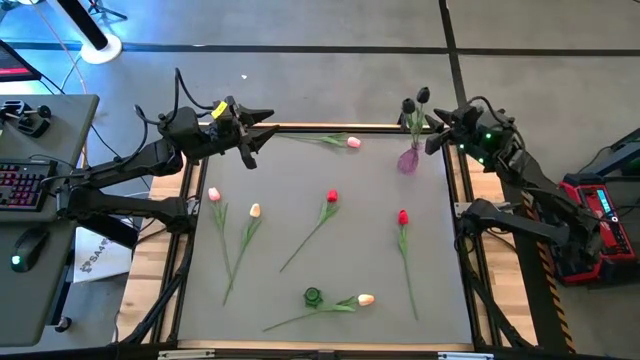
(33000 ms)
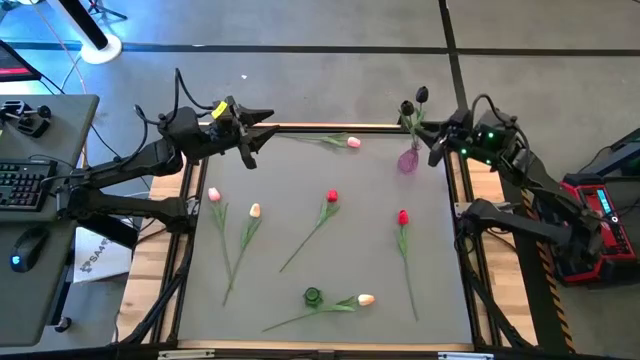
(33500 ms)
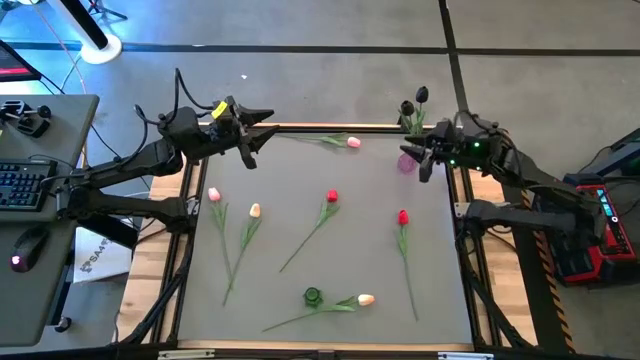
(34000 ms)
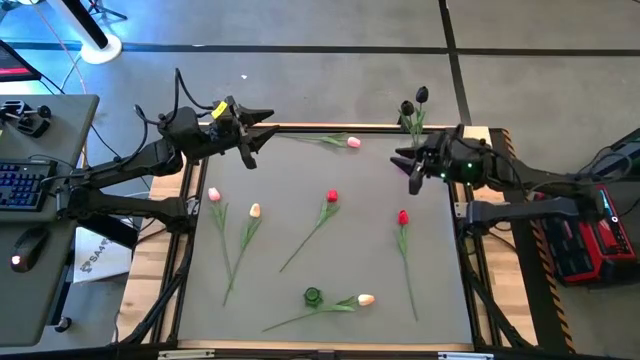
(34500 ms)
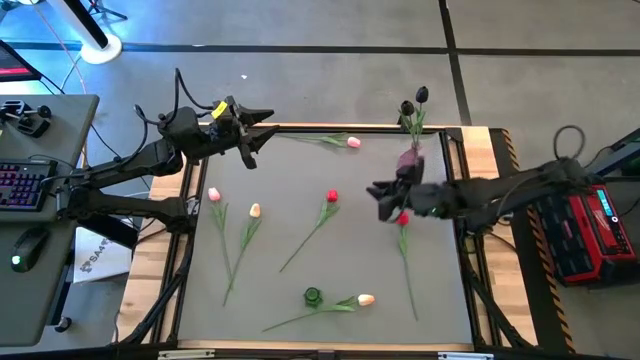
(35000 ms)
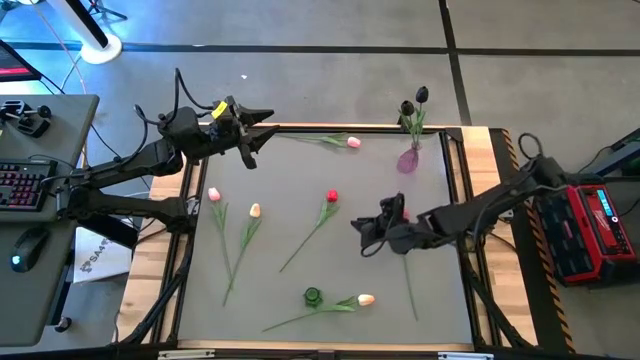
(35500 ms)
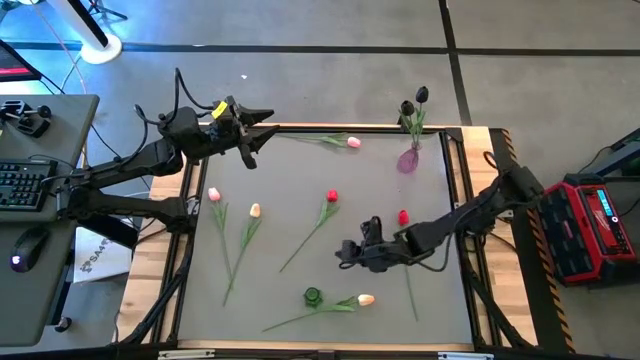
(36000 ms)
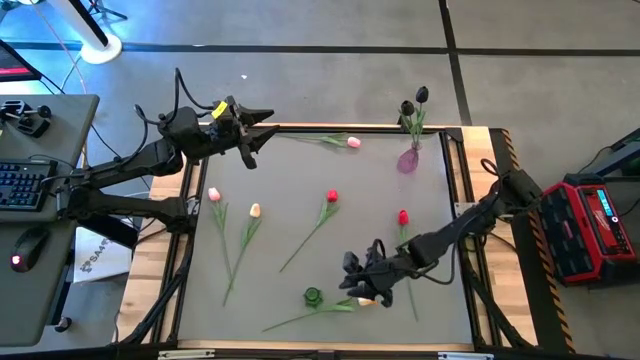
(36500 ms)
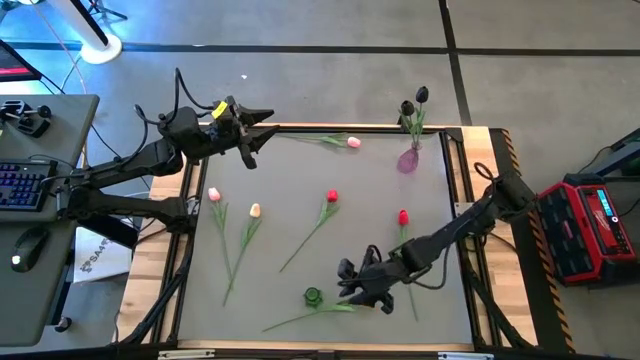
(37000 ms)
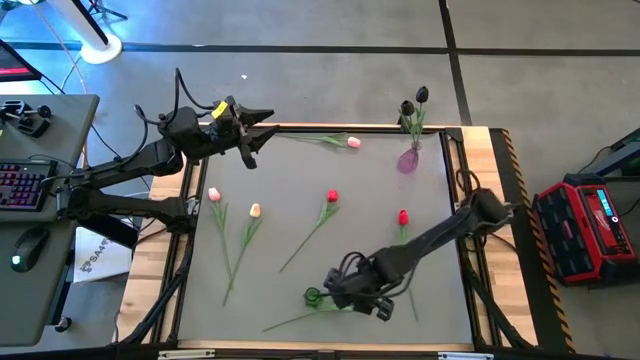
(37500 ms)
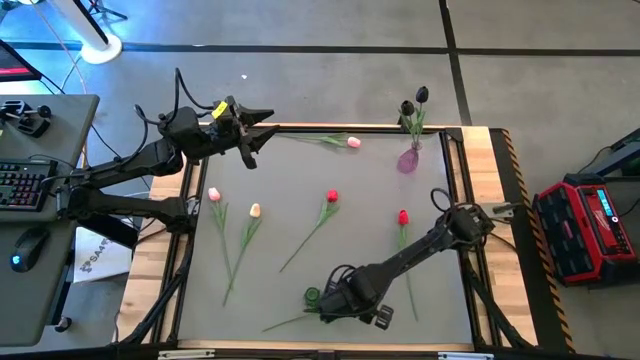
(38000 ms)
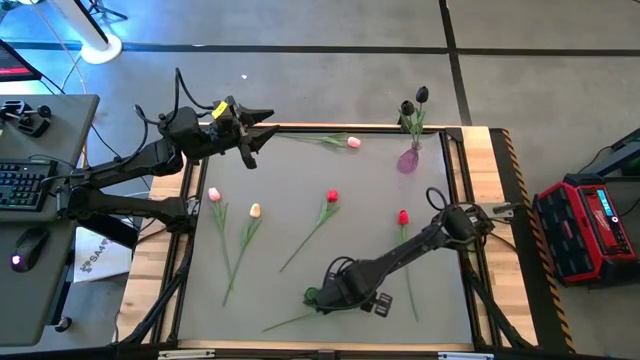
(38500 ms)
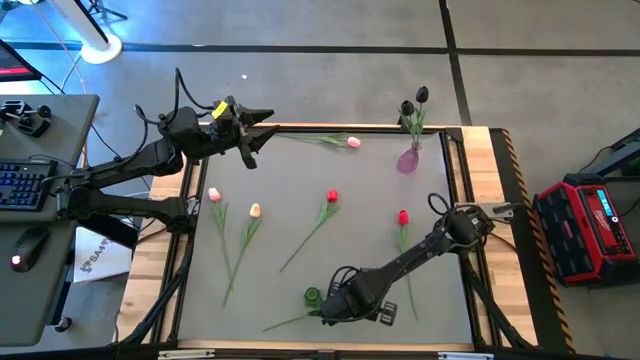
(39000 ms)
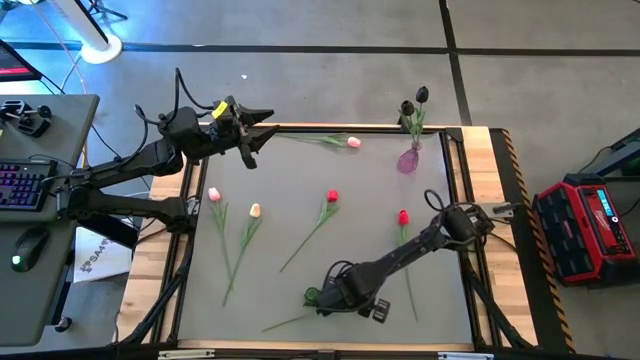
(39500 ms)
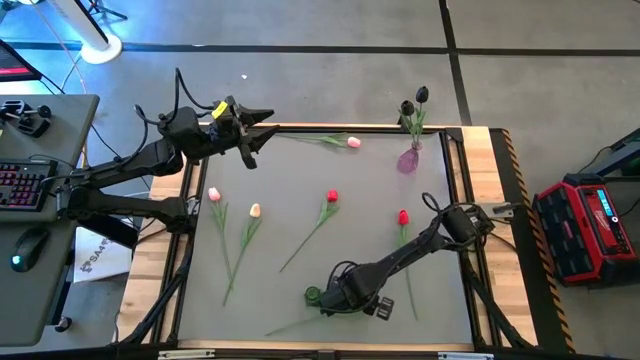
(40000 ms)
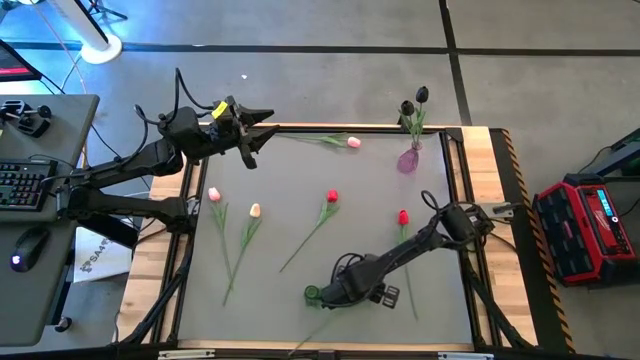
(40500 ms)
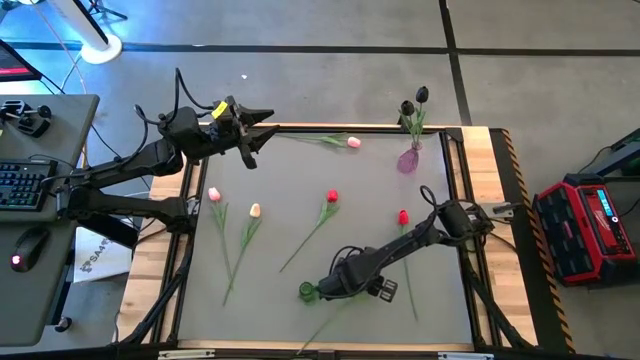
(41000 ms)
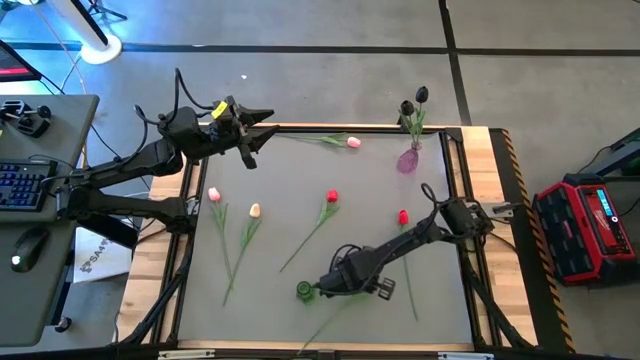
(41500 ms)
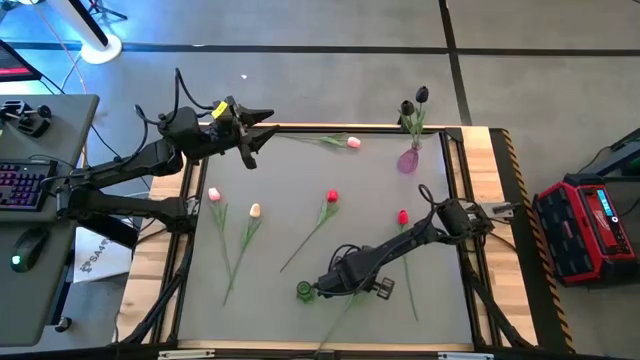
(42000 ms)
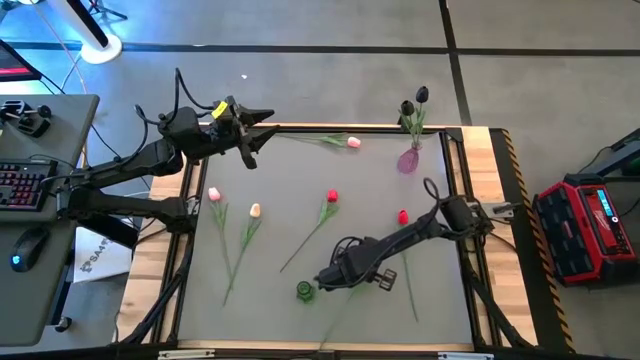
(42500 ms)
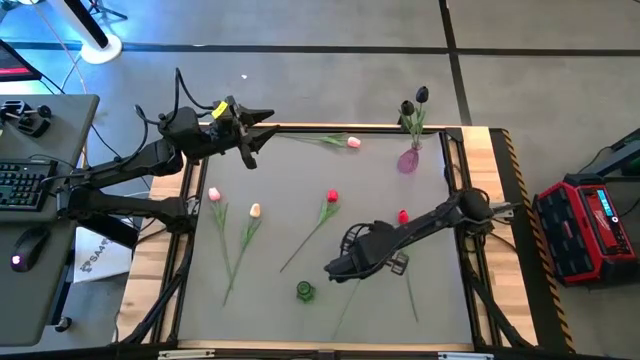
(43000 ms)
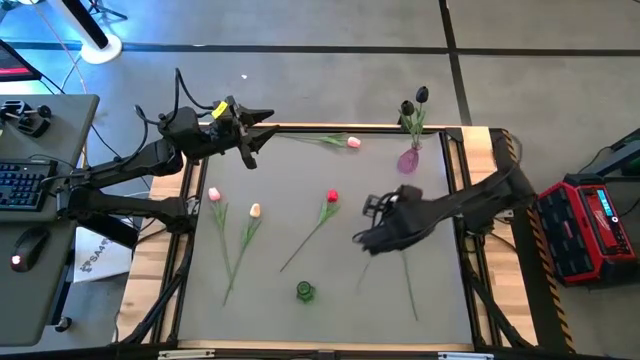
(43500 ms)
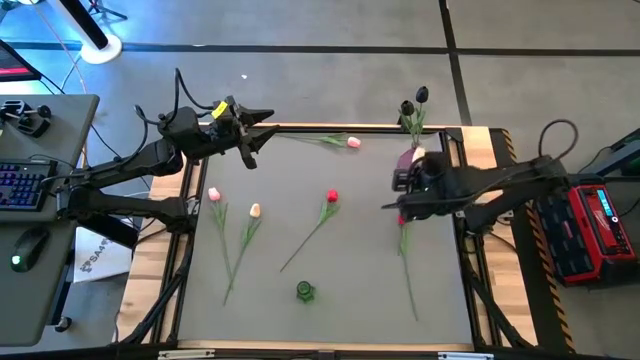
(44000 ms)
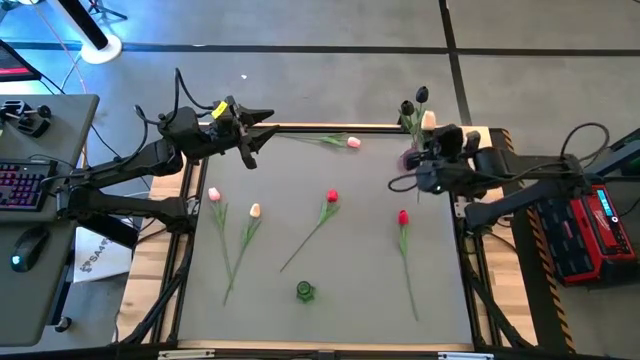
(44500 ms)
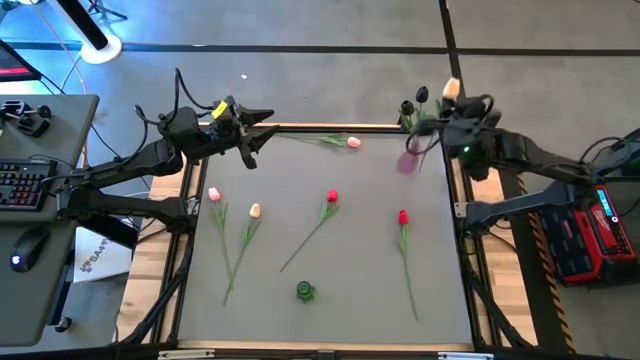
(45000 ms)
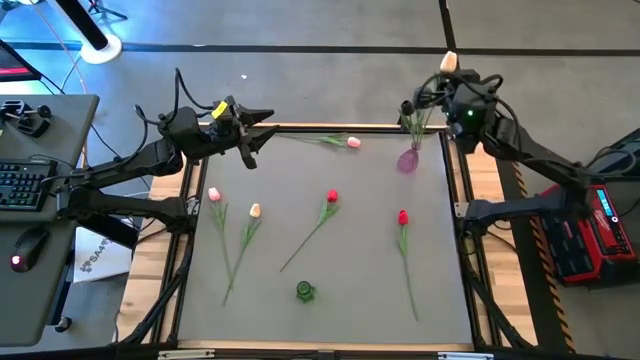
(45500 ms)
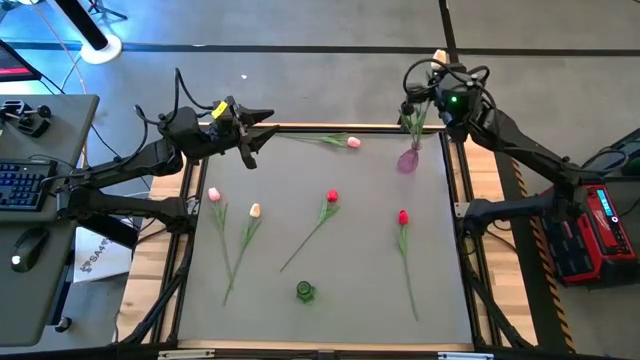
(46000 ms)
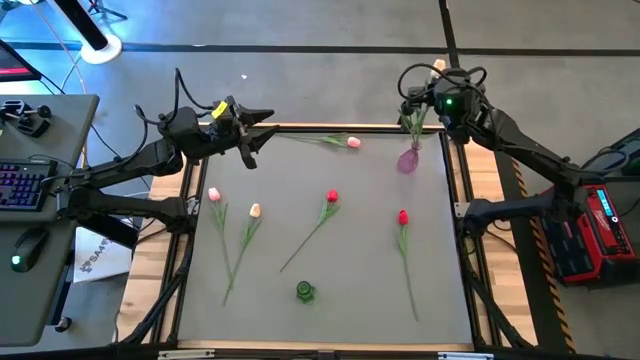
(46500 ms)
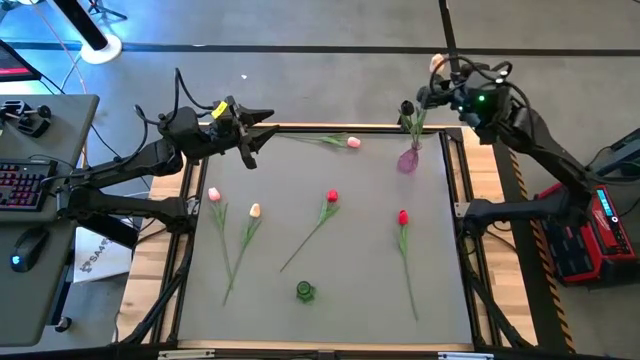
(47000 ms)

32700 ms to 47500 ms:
Task: Sort flowers into vase by color
Put the right white flower into the violet vase
